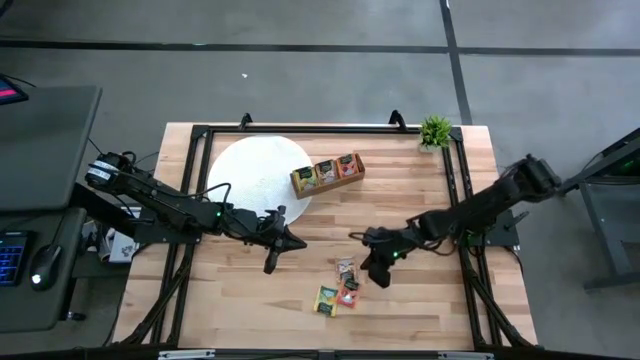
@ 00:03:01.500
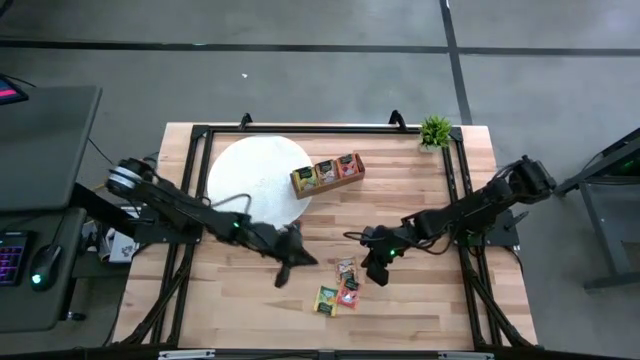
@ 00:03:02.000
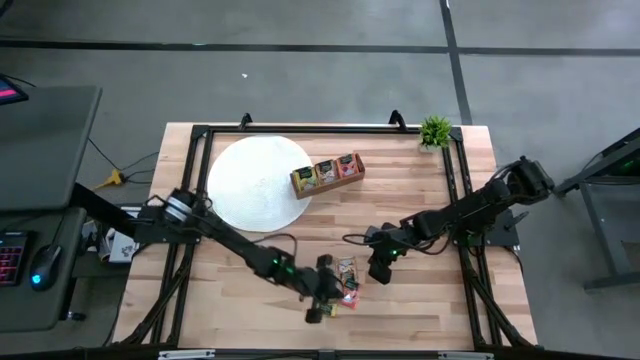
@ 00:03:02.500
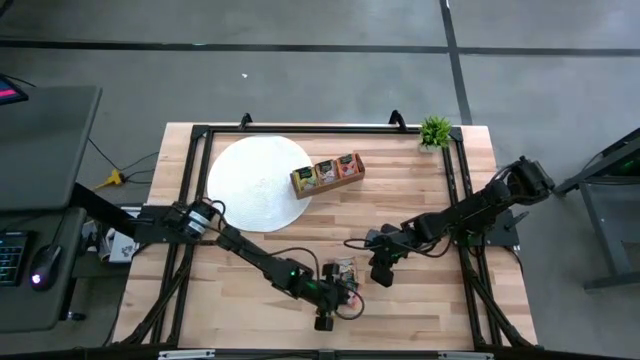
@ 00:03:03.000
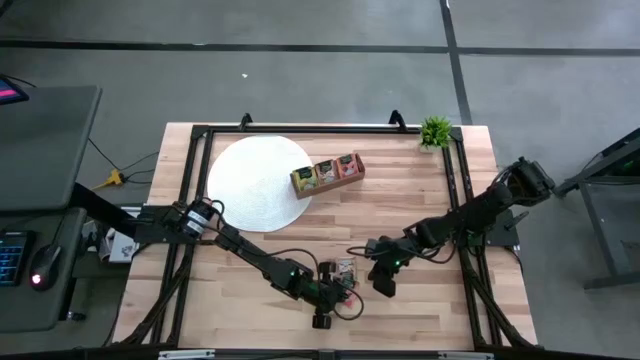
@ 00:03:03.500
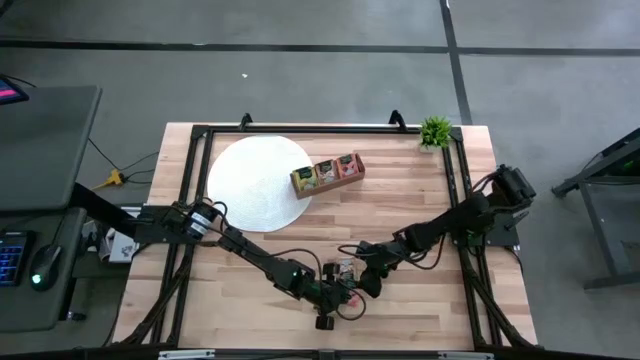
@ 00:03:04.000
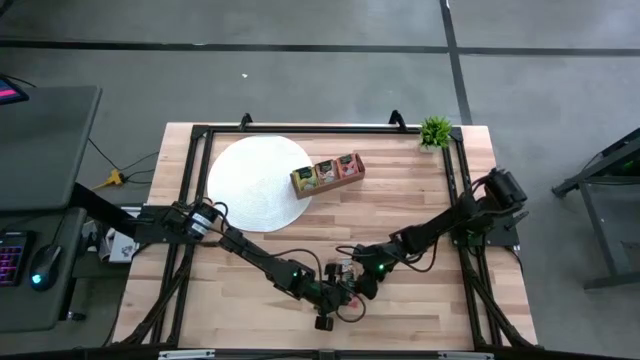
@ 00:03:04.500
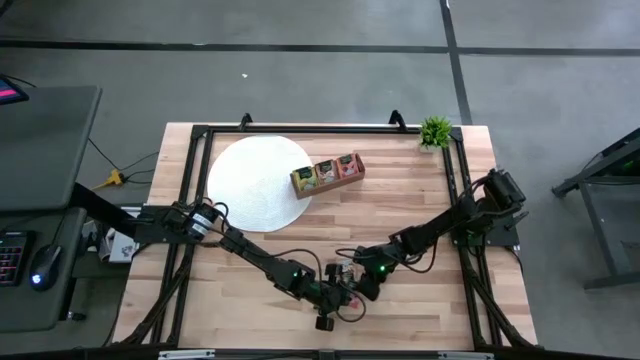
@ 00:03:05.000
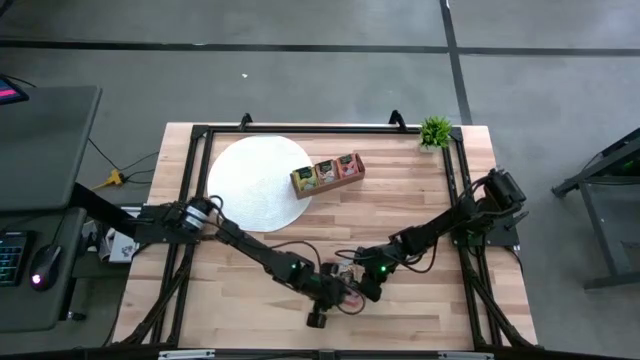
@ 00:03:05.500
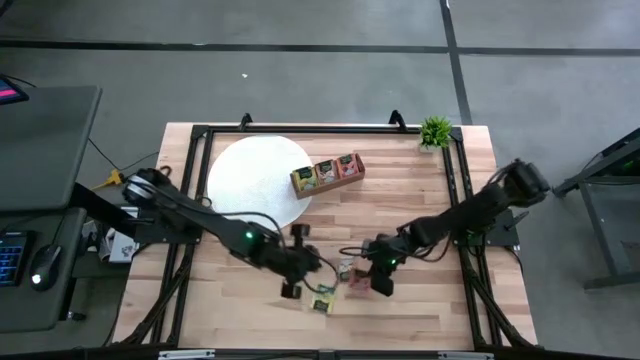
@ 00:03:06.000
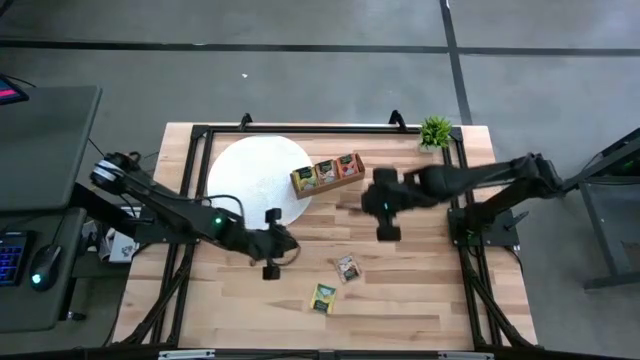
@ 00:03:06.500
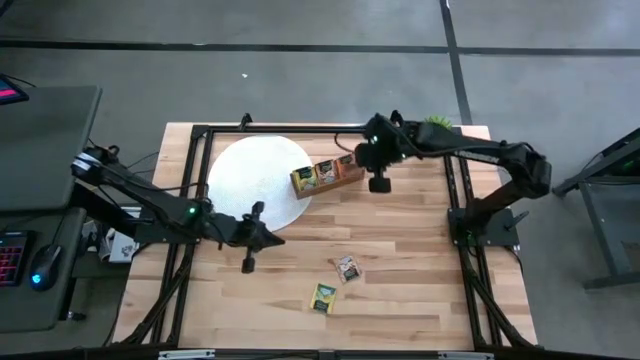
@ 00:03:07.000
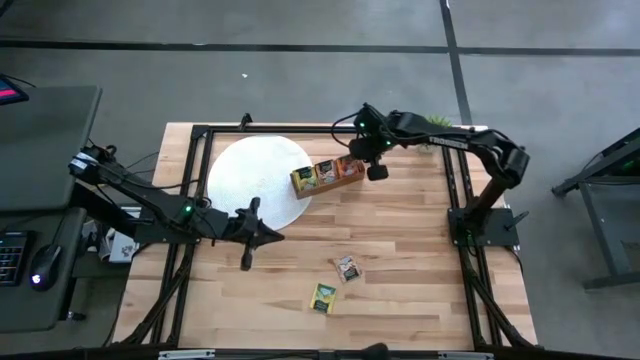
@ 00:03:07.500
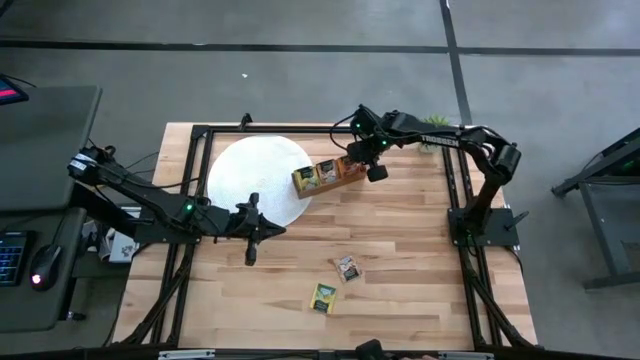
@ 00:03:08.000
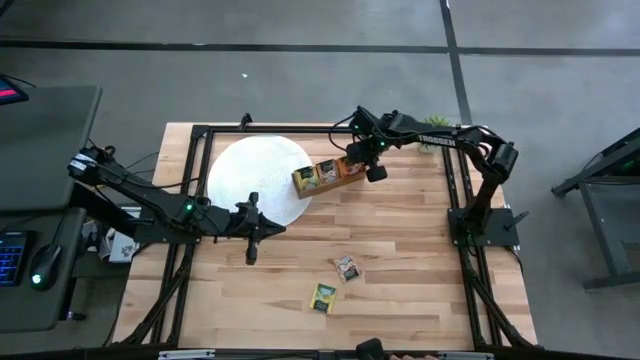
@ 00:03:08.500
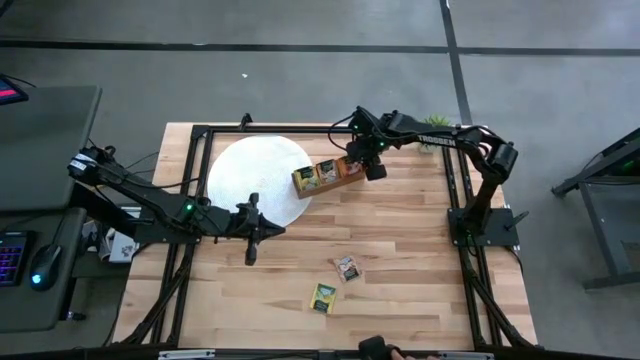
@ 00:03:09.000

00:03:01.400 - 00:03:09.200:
Task: Pick & Place Tea
Put the orange tea bag into the right compartment of the wooden organizer

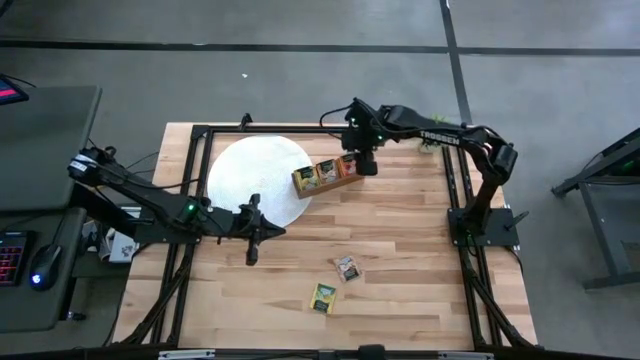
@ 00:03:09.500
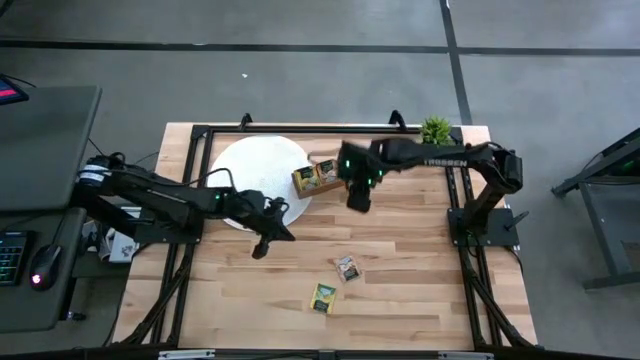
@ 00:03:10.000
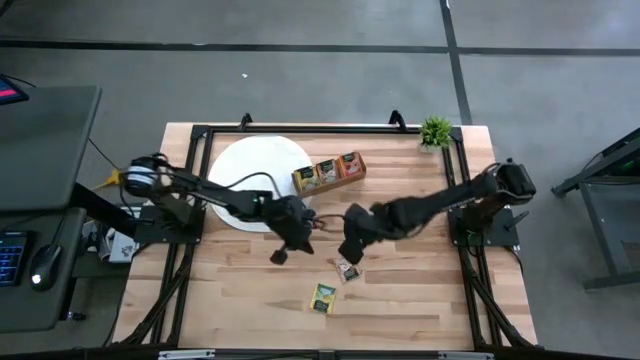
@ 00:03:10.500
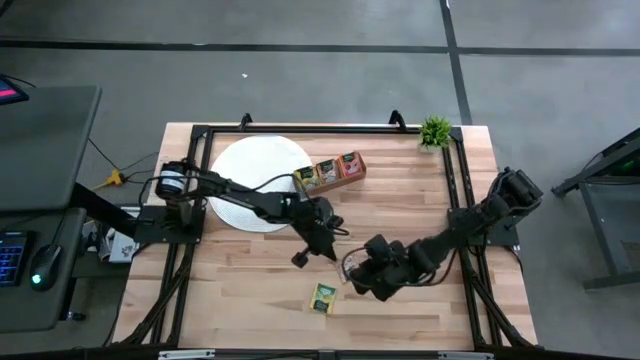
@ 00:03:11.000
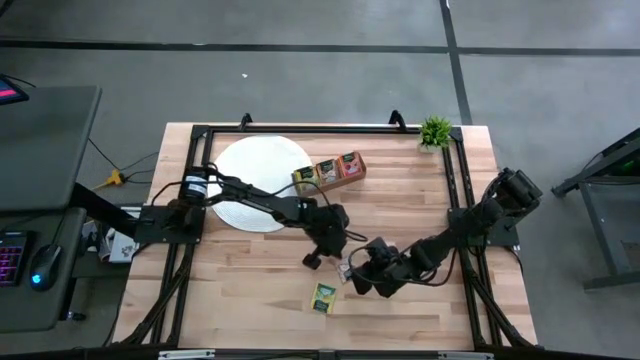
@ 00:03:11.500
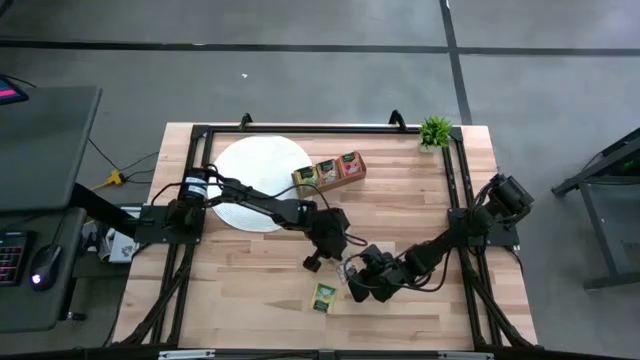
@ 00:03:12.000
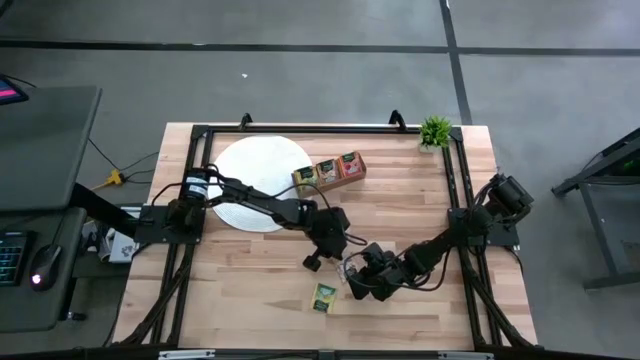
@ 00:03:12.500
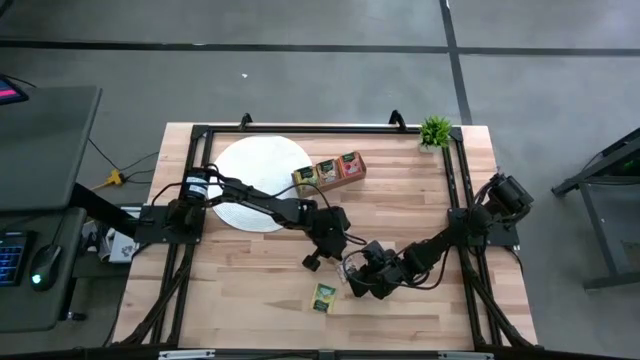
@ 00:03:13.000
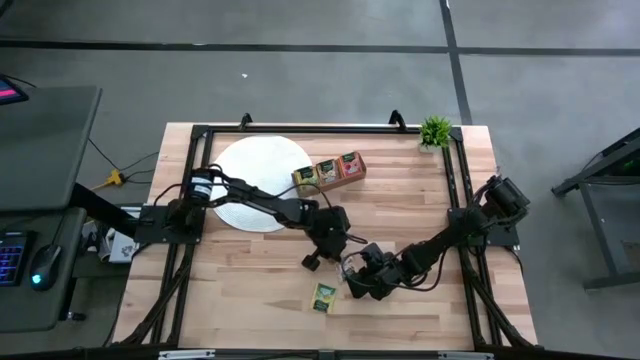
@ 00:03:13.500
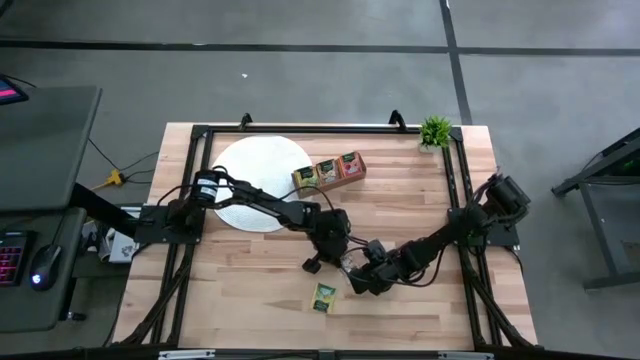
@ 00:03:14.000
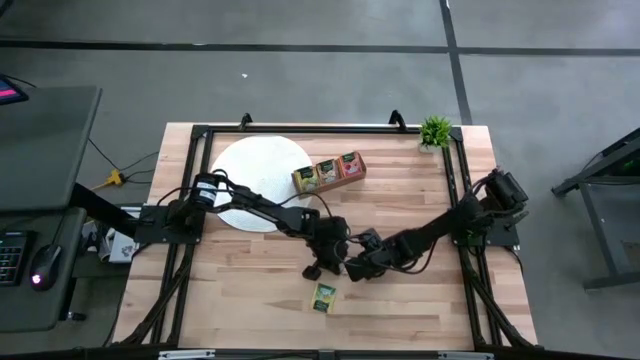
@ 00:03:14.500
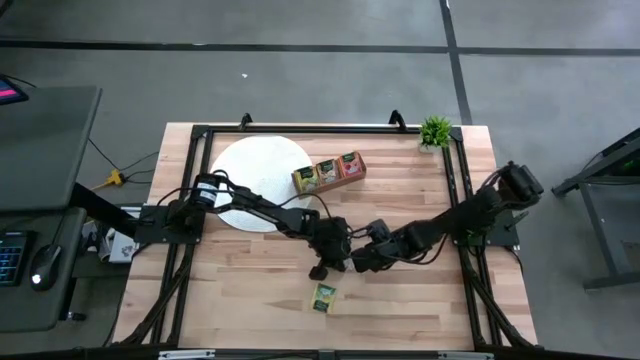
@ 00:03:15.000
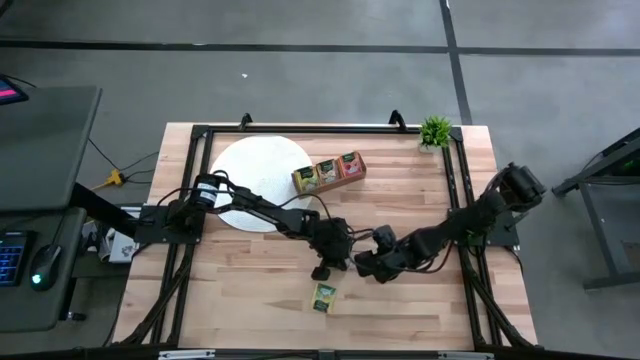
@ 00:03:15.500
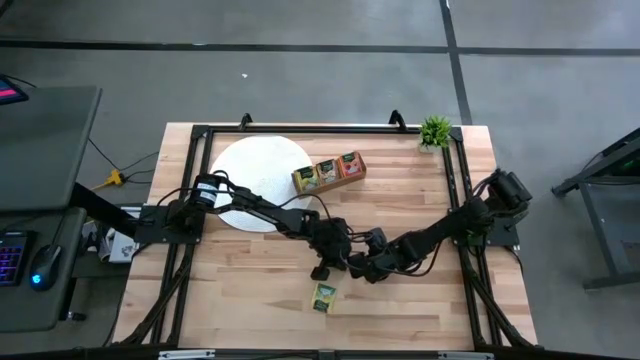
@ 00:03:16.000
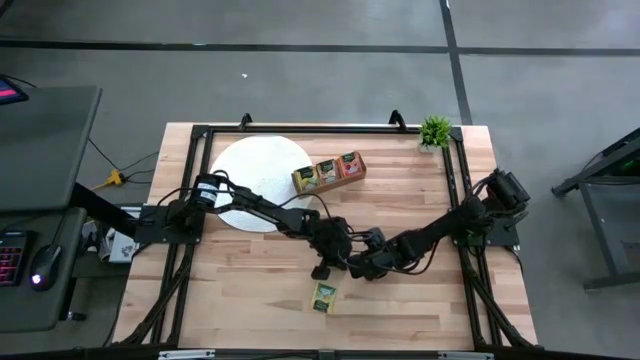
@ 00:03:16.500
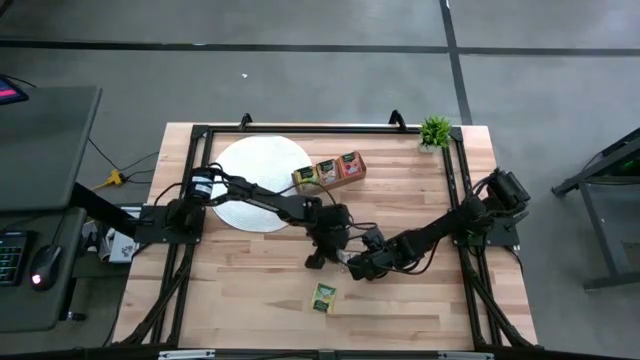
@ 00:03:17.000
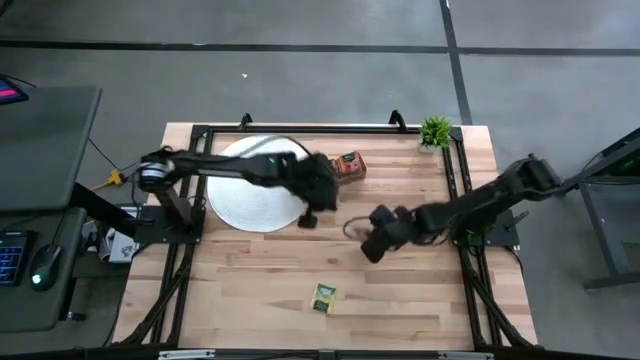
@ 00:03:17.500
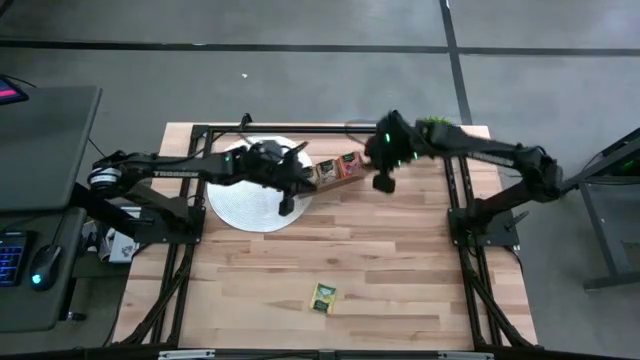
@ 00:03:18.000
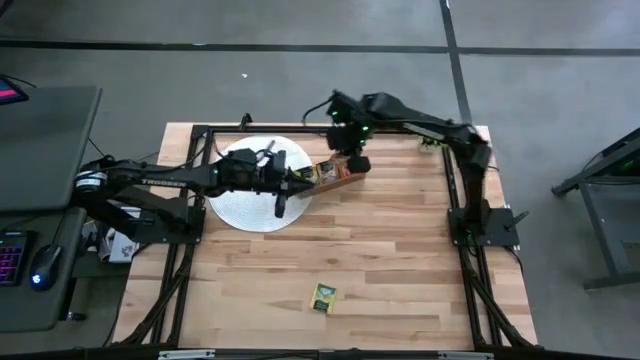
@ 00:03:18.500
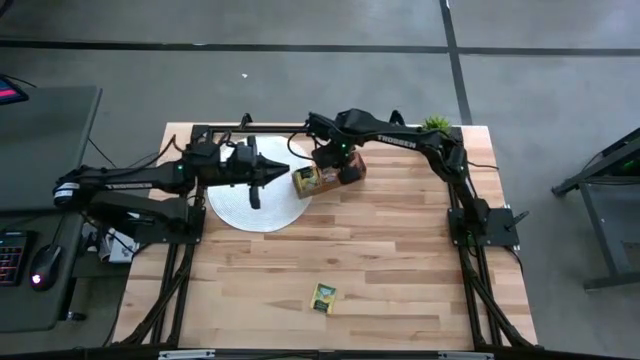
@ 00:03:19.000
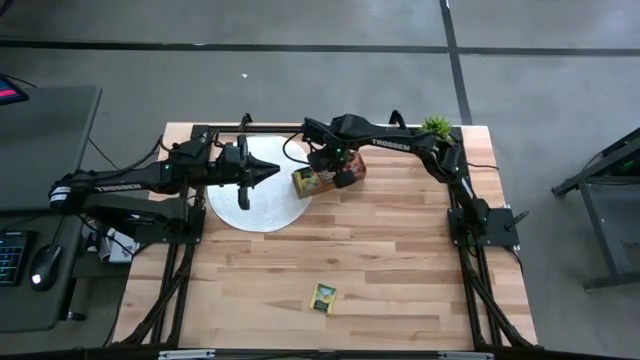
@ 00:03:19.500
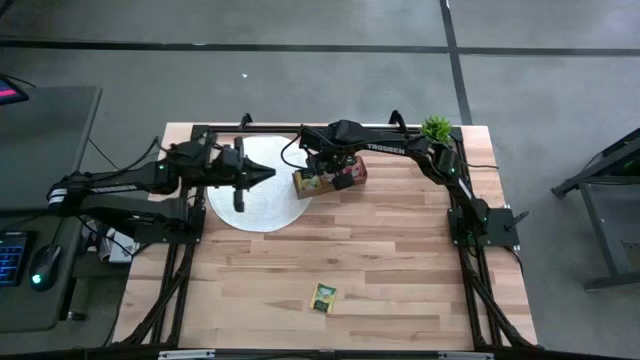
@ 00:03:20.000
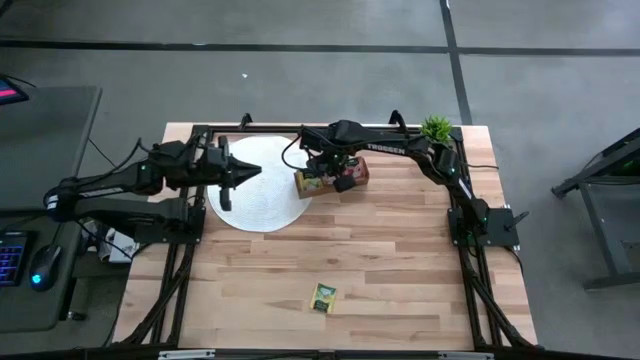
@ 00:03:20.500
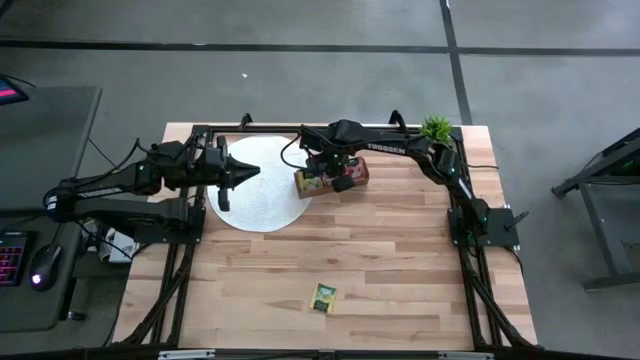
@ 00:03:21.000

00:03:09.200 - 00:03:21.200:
Put the brown tea bag into the middle compartment of the wooden organizer

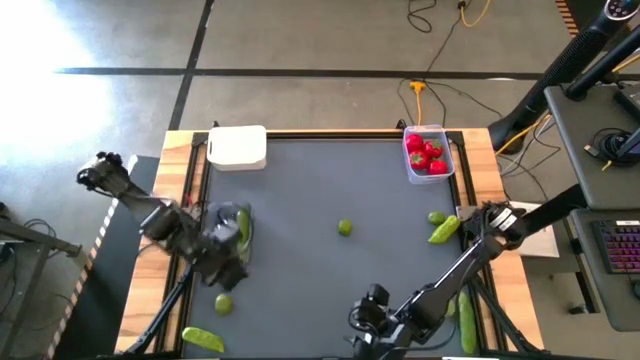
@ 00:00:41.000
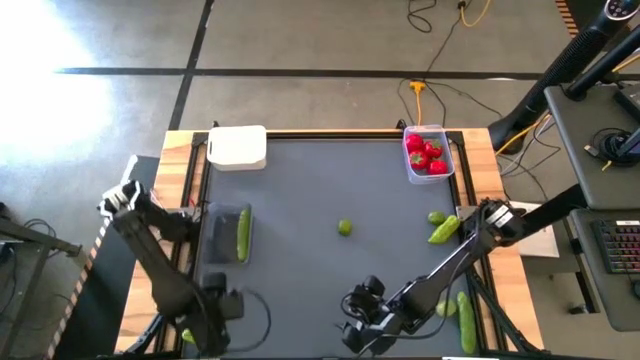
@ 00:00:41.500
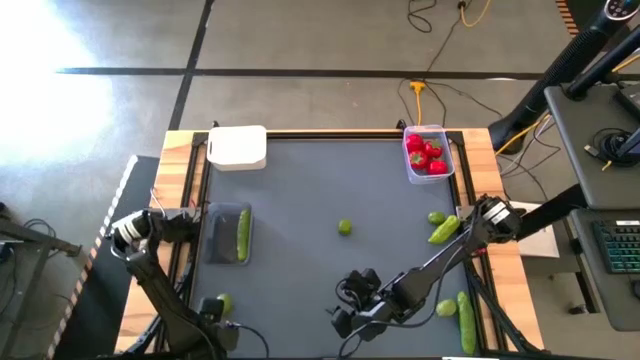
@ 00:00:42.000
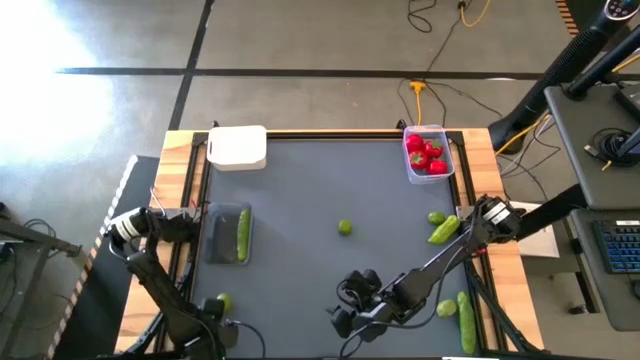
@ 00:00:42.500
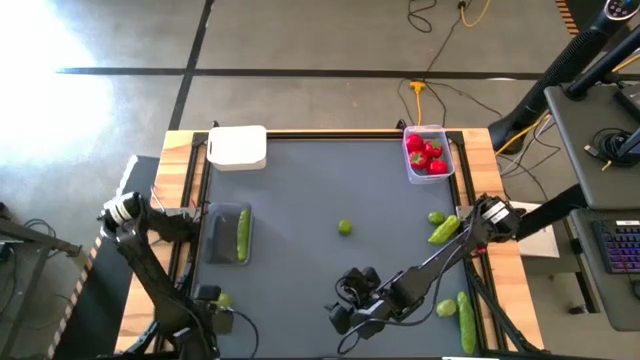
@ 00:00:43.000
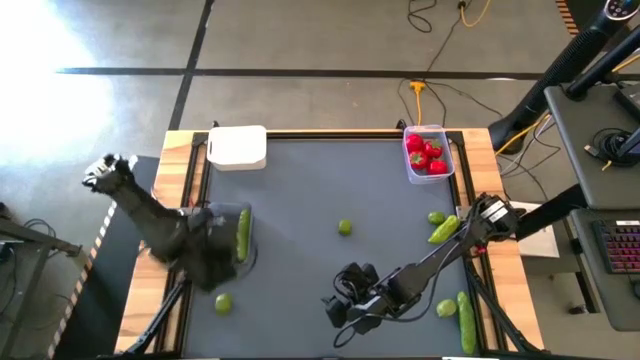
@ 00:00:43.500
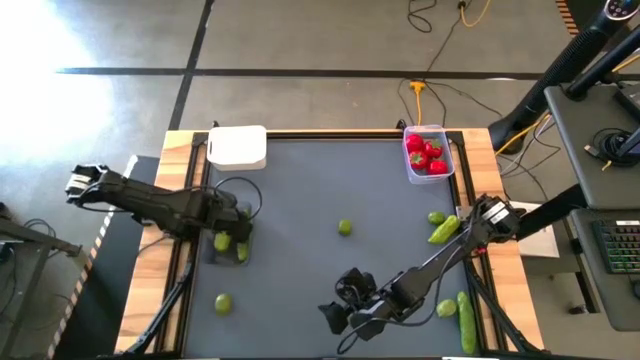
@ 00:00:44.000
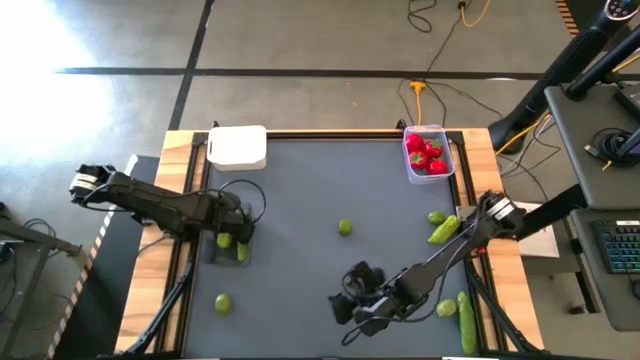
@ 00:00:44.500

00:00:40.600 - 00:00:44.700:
Task: Sort produce into baskets
Put the green cucumber into the black bin
